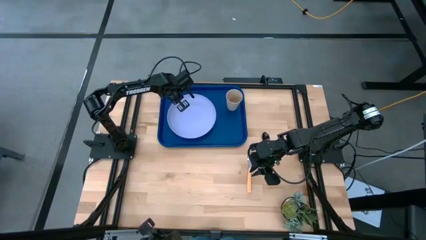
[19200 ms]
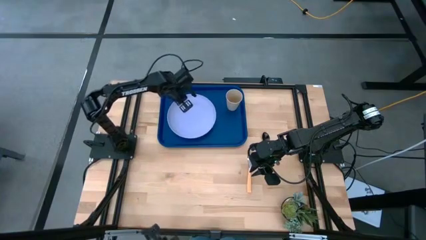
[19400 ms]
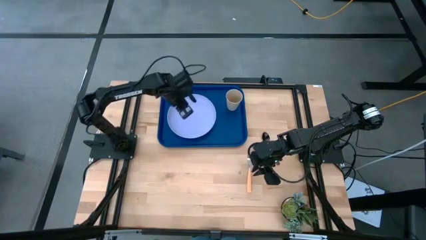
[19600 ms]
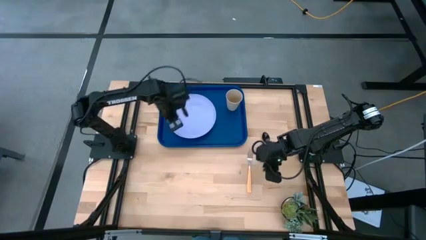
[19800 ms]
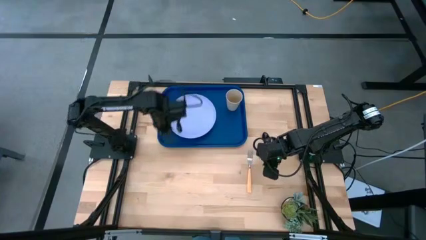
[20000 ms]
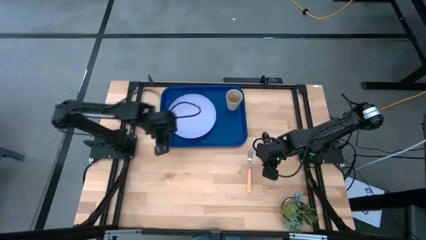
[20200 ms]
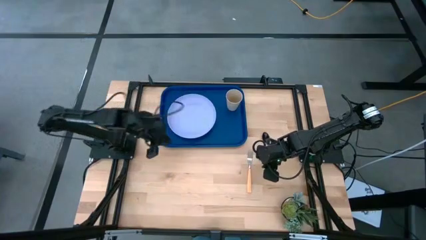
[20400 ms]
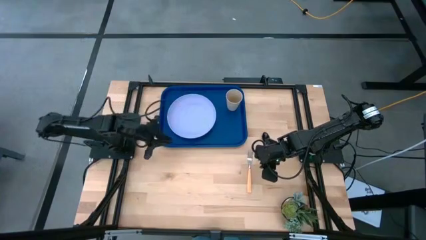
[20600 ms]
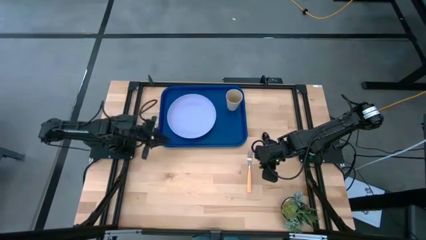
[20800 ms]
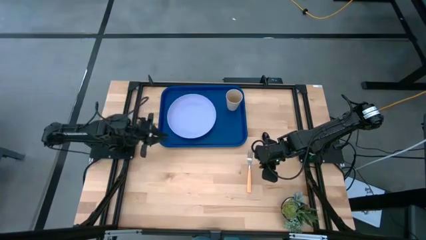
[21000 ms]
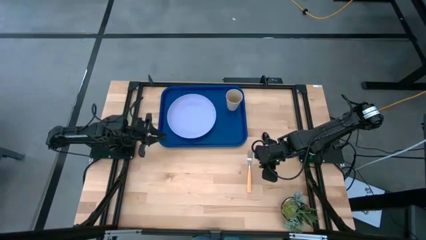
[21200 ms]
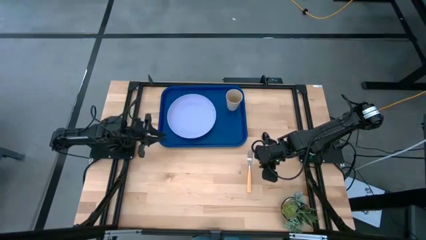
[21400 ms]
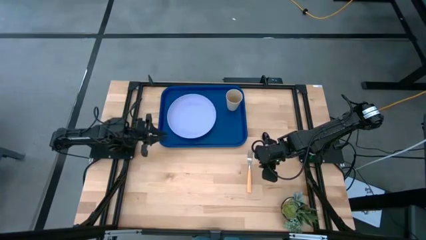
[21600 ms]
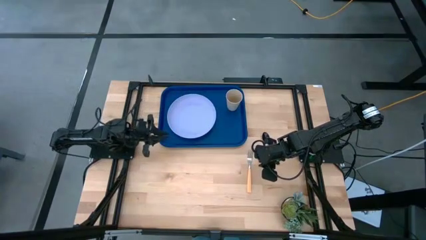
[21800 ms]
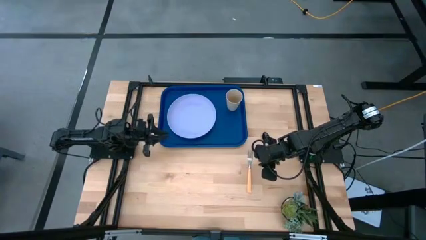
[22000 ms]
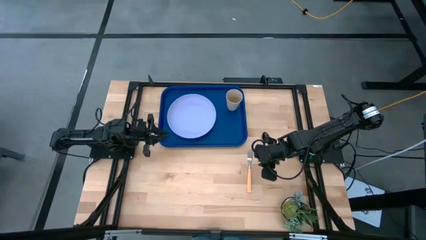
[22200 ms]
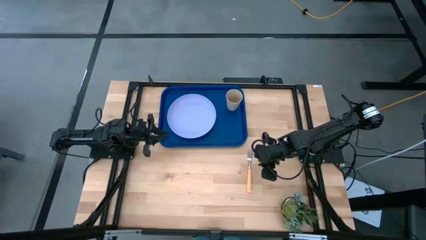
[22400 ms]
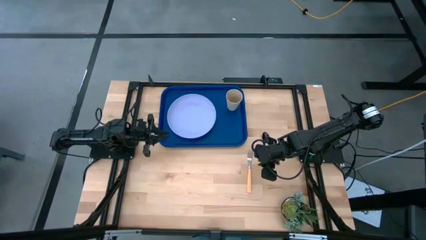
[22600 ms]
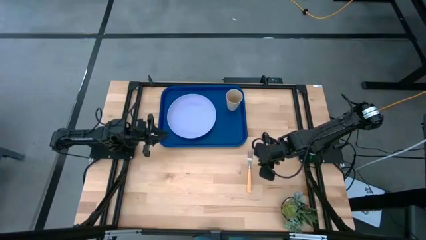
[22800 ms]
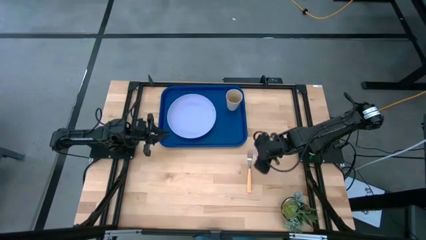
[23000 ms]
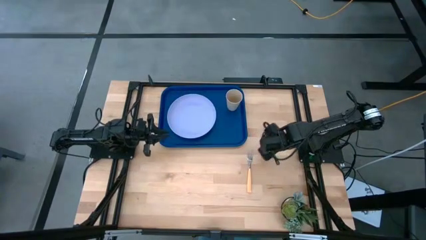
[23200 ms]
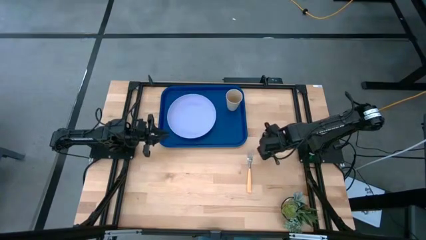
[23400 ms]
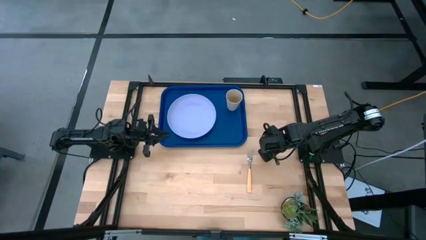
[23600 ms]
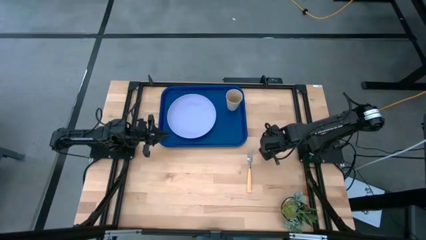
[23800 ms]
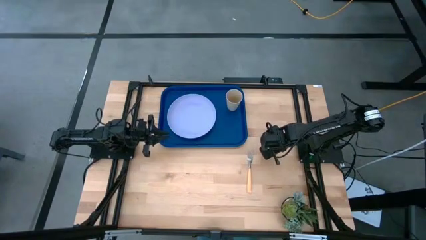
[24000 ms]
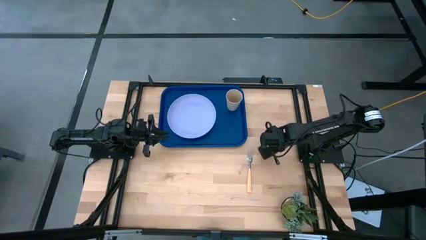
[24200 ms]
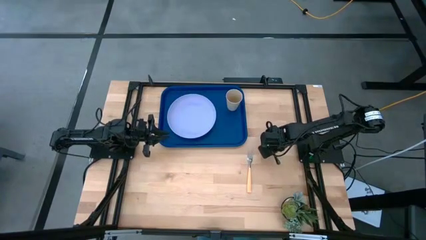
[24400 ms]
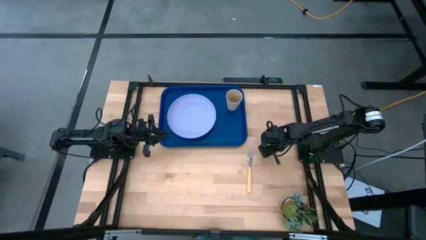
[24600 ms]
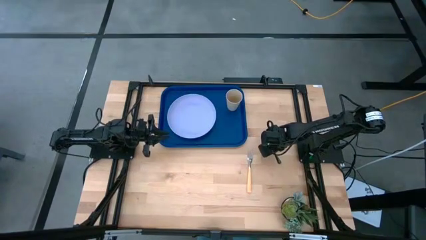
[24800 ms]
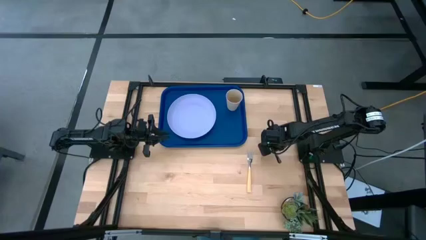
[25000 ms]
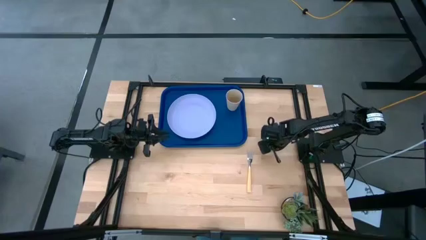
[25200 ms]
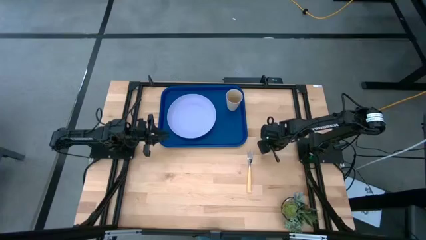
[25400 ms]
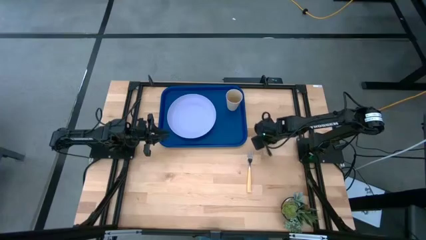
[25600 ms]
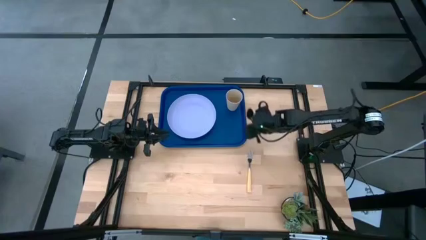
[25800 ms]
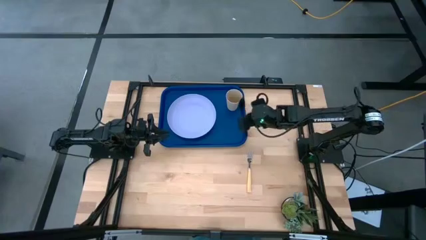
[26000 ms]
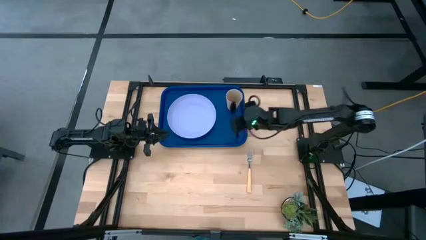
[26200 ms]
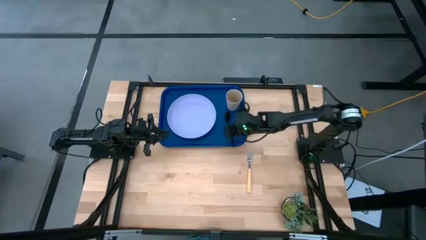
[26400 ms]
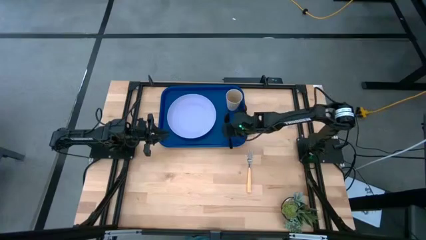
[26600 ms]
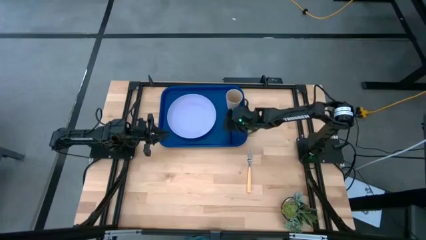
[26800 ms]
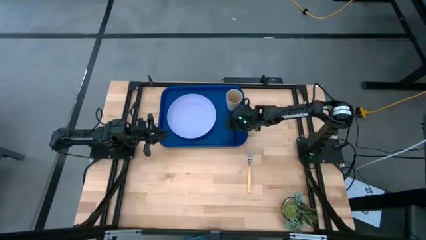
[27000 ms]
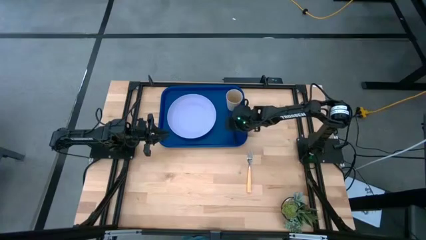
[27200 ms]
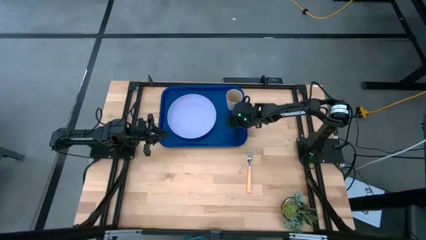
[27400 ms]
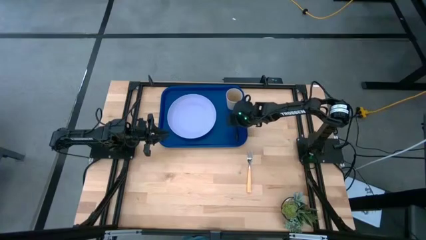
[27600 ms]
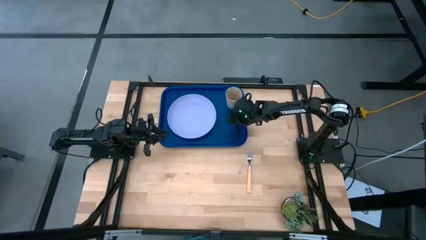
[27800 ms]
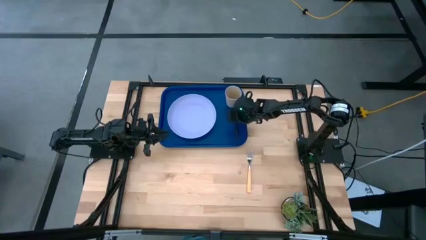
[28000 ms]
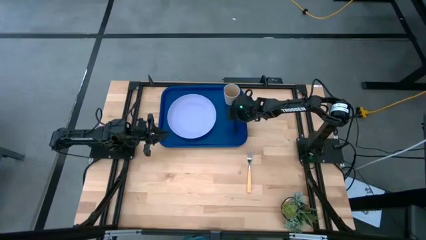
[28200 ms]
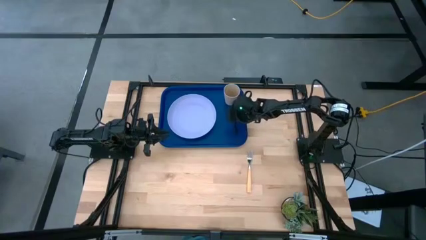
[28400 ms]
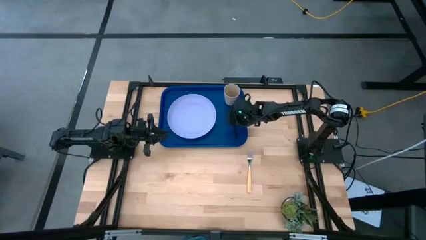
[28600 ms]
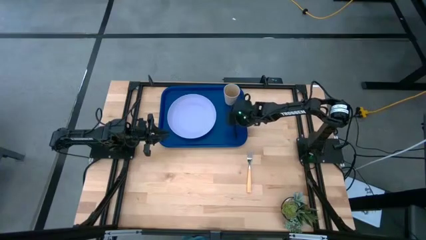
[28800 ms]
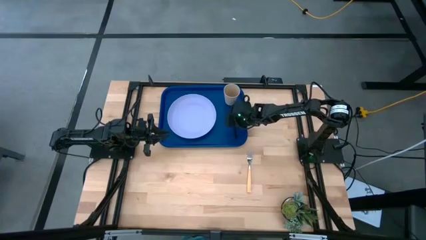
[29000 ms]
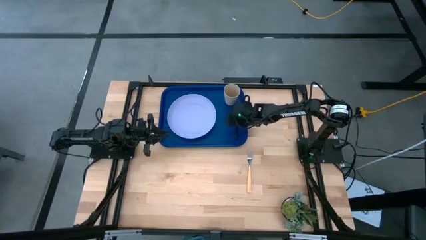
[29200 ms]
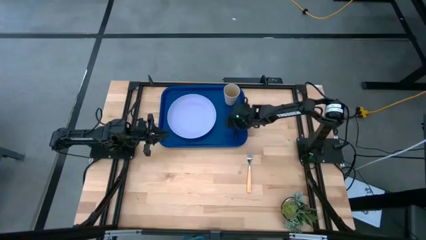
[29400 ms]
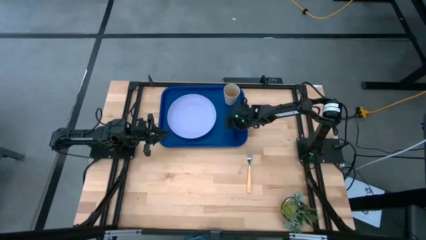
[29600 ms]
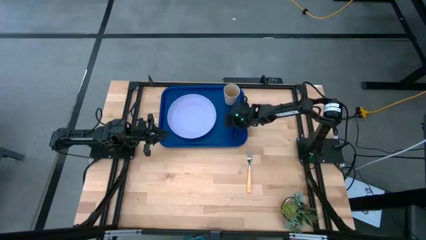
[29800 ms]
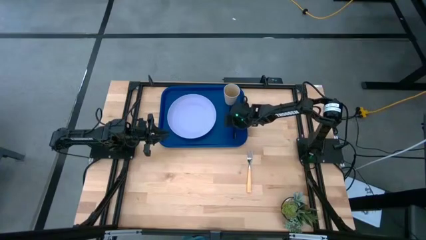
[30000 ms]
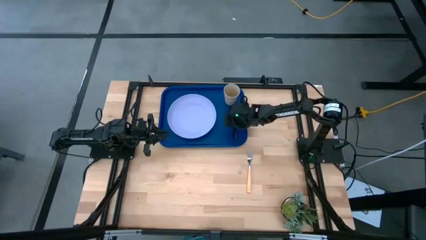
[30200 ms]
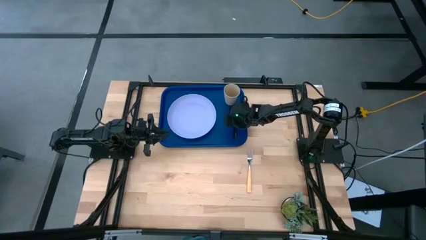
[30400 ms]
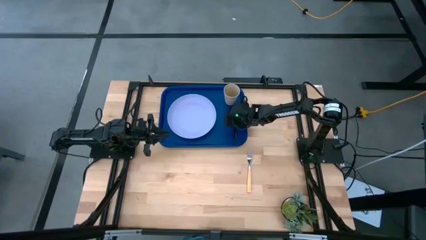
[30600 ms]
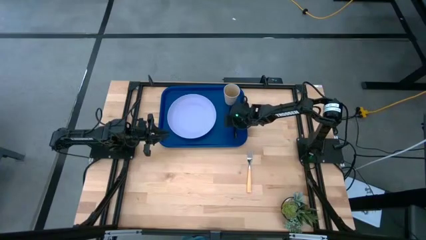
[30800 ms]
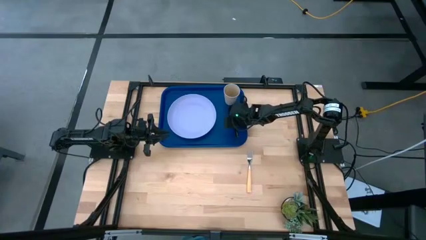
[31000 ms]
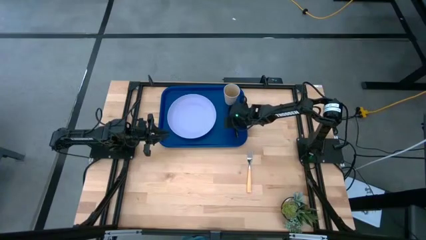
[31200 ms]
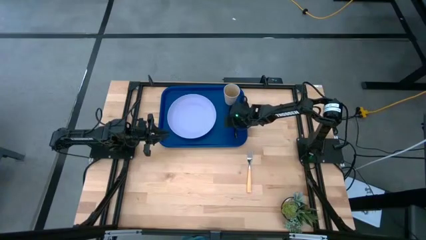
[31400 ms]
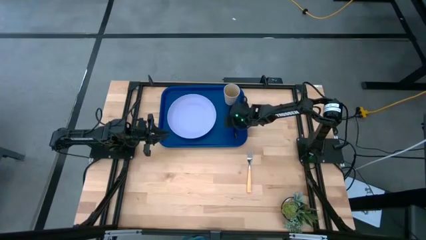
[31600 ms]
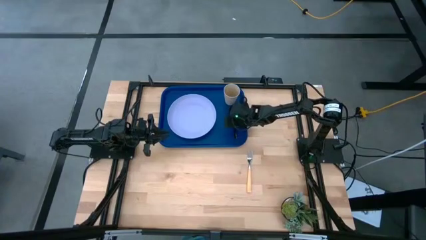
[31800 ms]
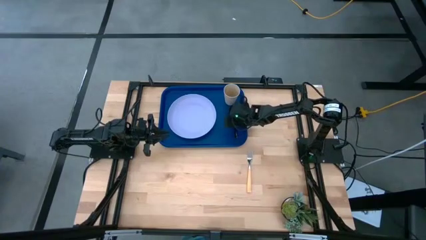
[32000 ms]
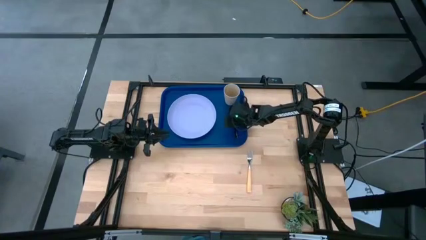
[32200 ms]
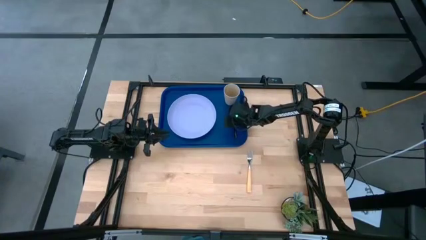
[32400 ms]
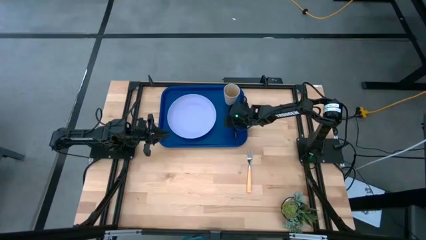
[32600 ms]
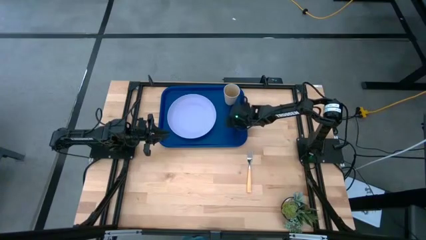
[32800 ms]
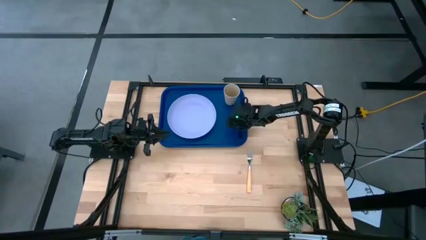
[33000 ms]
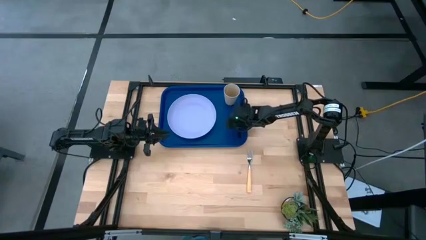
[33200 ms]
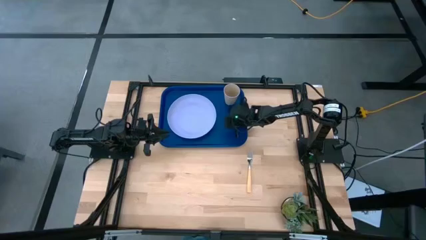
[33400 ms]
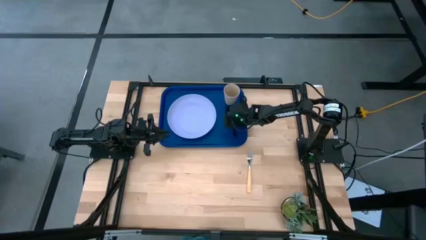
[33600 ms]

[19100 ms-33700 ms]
Task: Pick and place plate/cup/fork/spoon on tray
Put the black spoon on the blue tray
